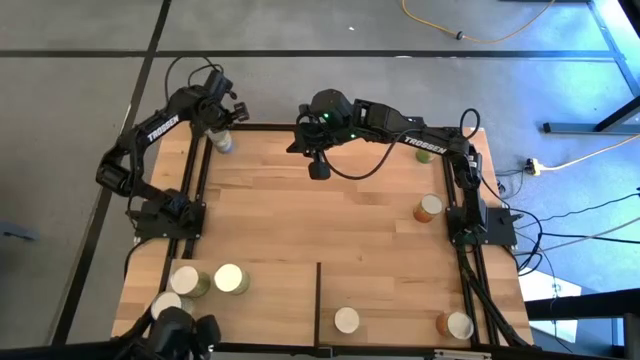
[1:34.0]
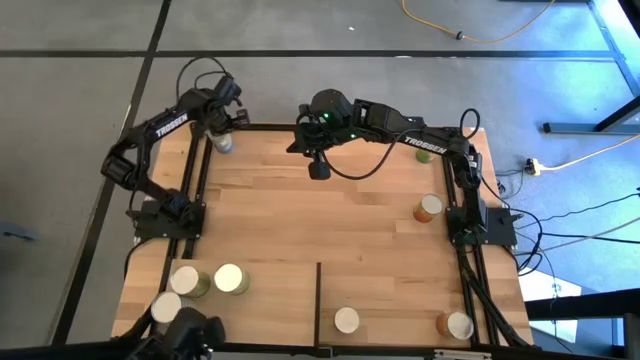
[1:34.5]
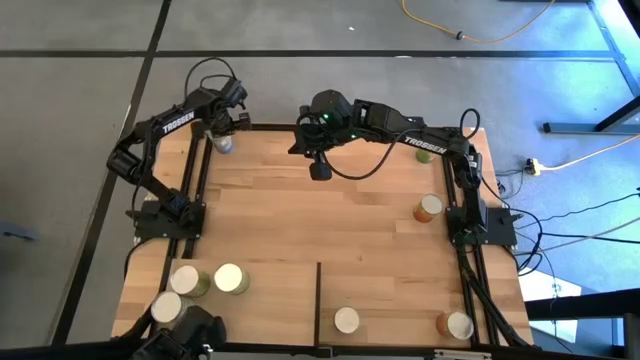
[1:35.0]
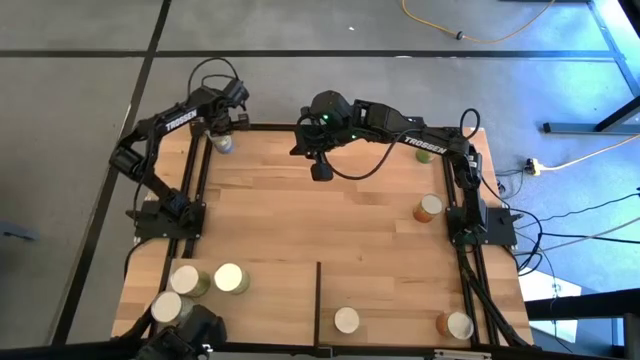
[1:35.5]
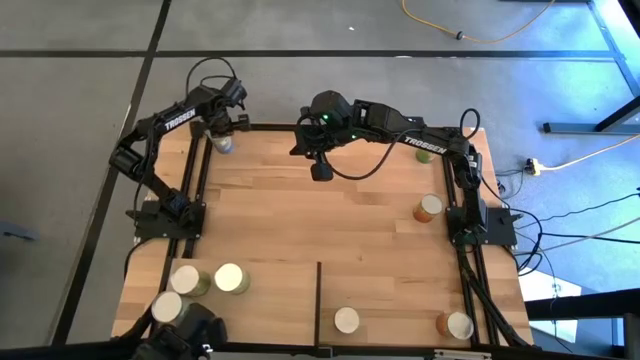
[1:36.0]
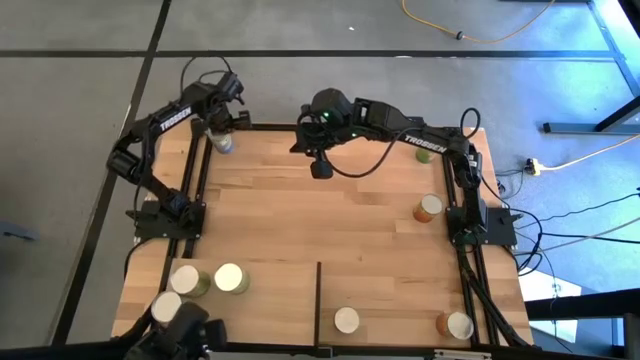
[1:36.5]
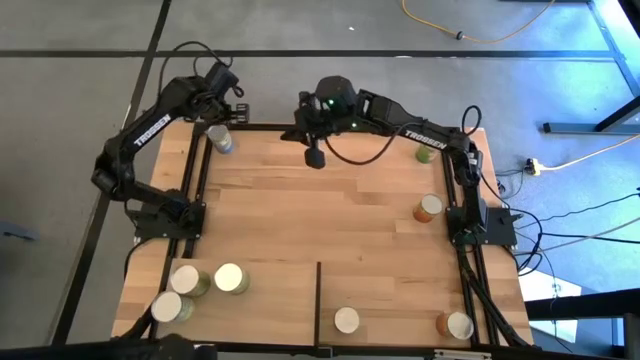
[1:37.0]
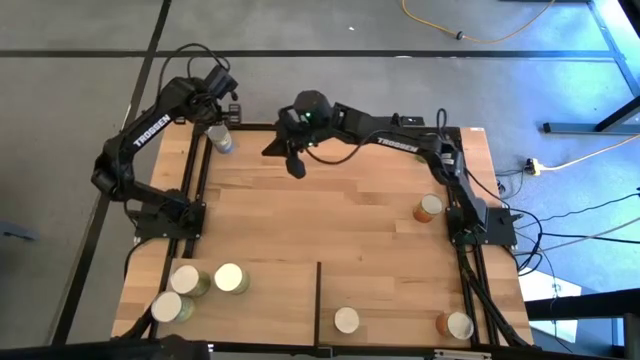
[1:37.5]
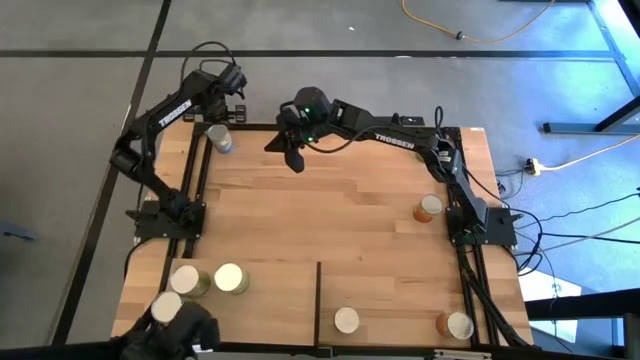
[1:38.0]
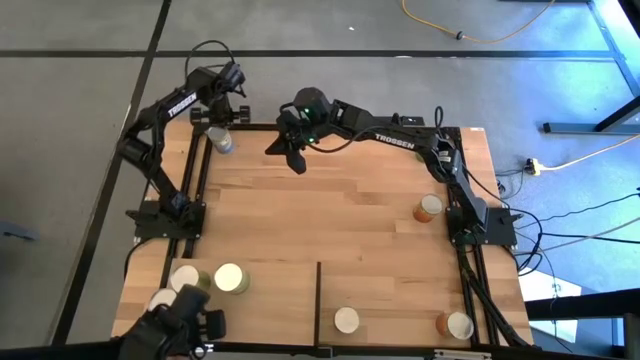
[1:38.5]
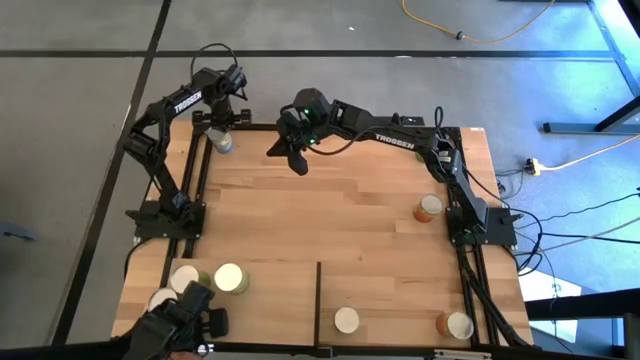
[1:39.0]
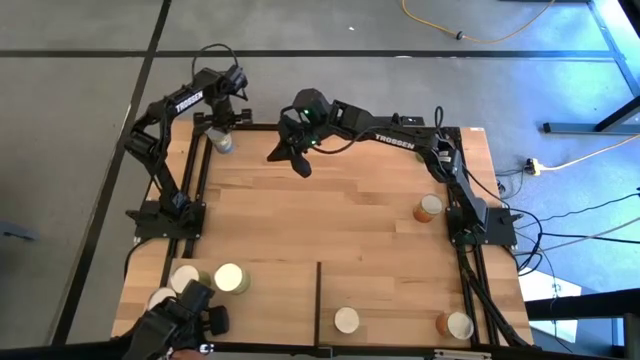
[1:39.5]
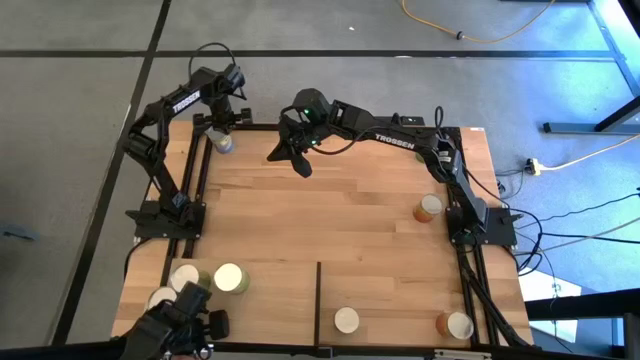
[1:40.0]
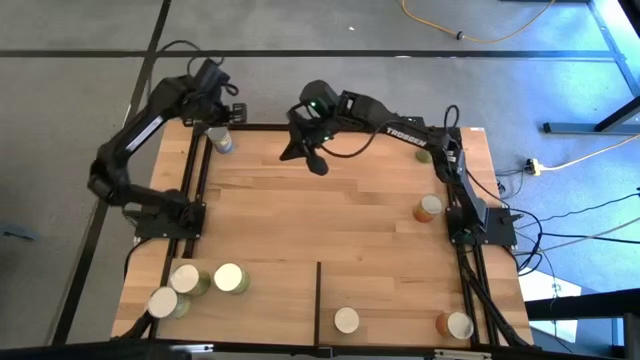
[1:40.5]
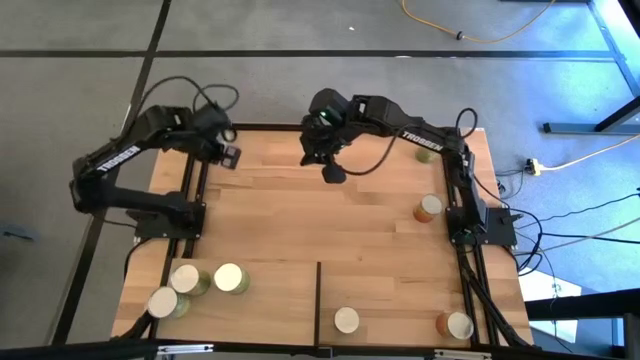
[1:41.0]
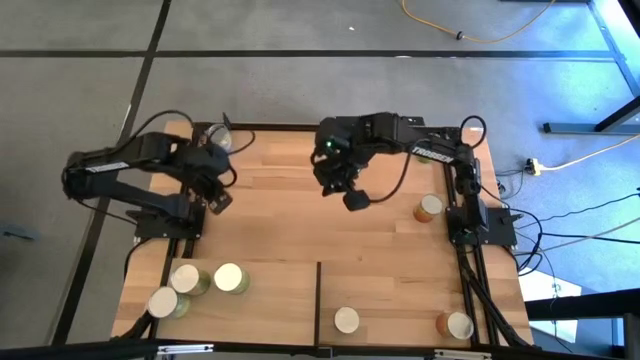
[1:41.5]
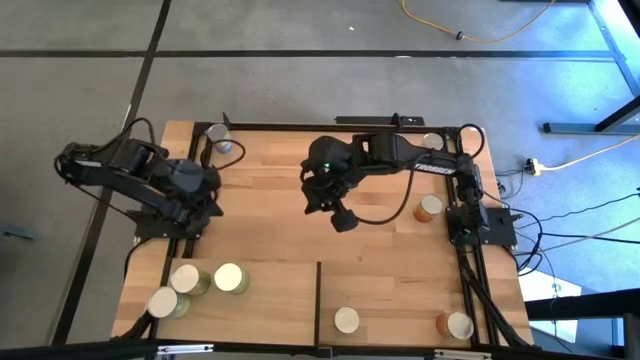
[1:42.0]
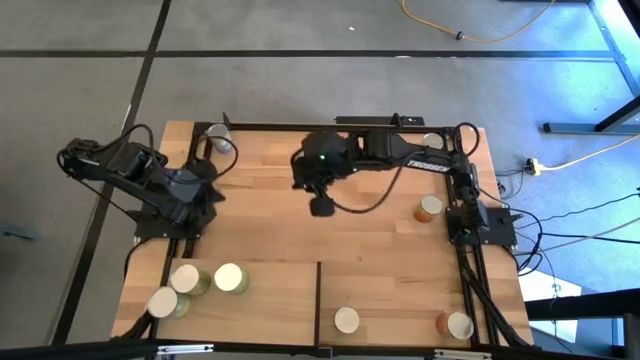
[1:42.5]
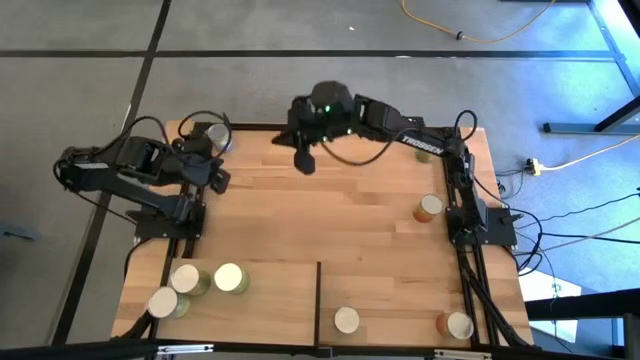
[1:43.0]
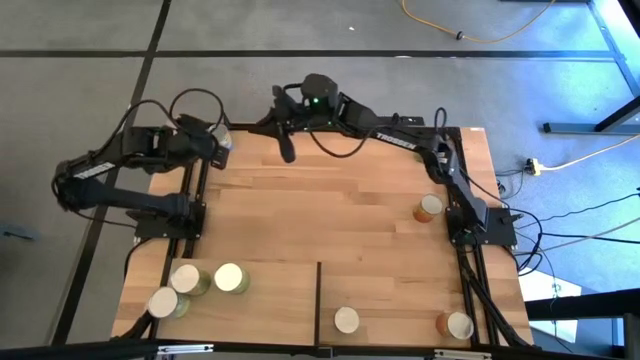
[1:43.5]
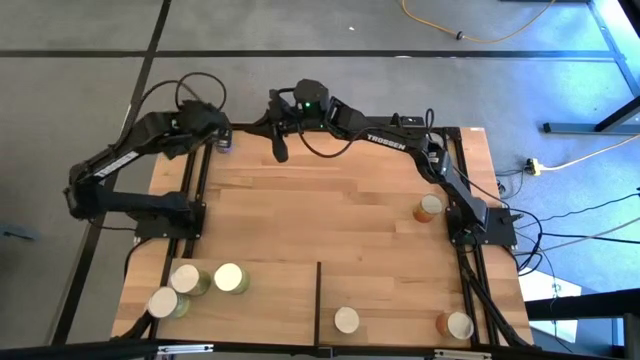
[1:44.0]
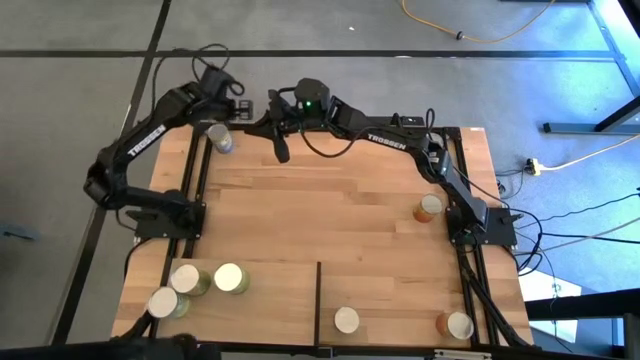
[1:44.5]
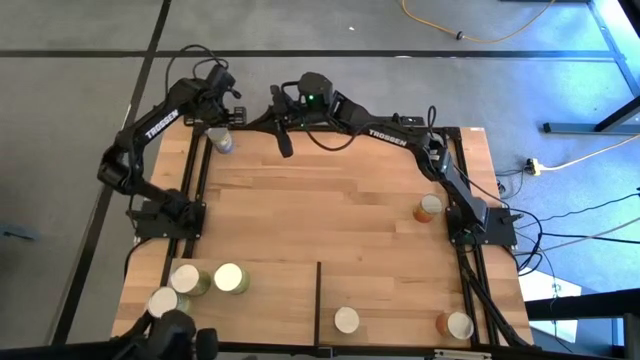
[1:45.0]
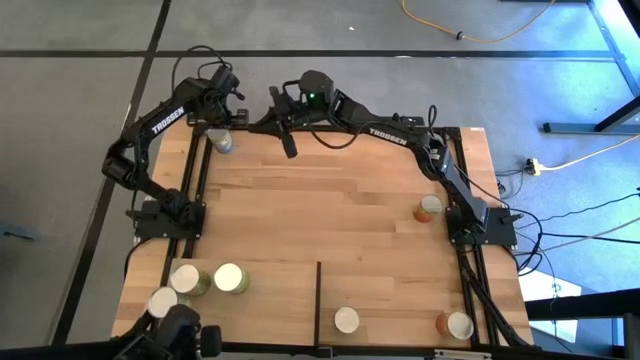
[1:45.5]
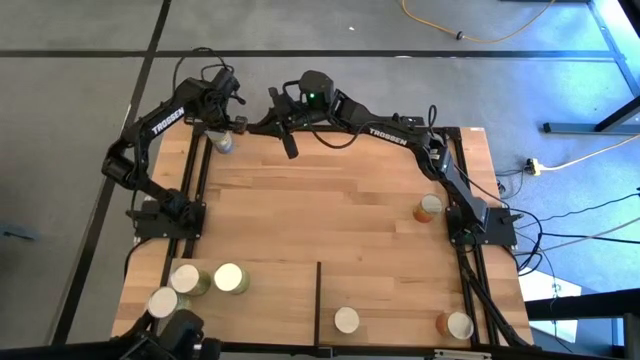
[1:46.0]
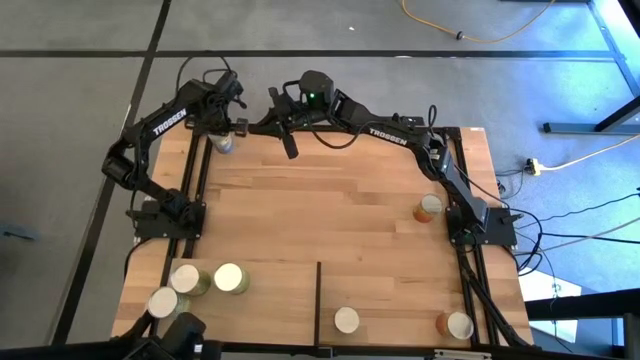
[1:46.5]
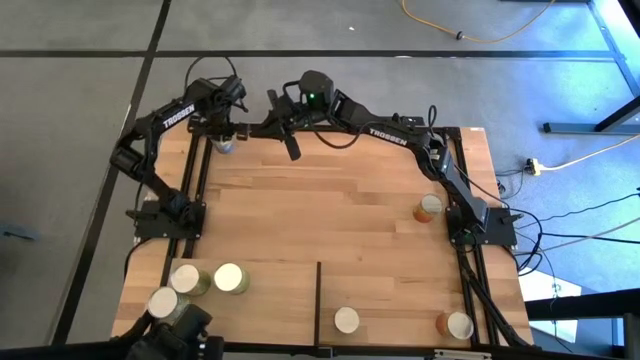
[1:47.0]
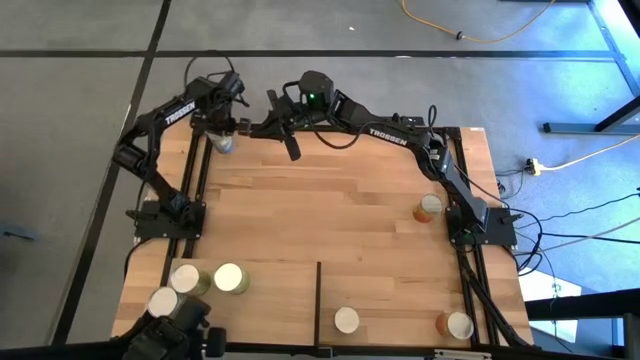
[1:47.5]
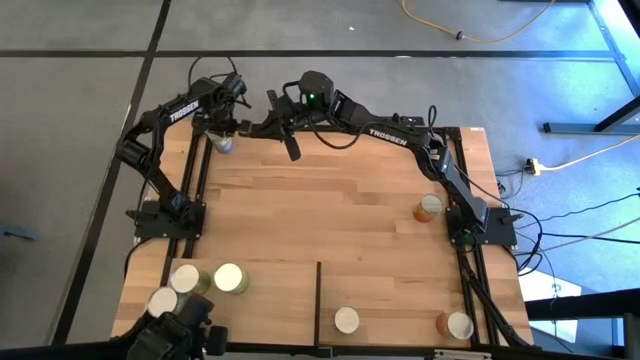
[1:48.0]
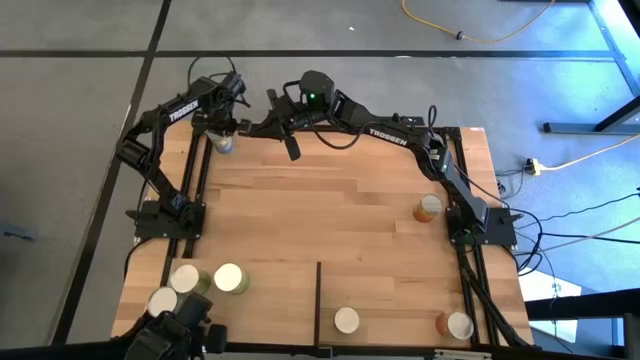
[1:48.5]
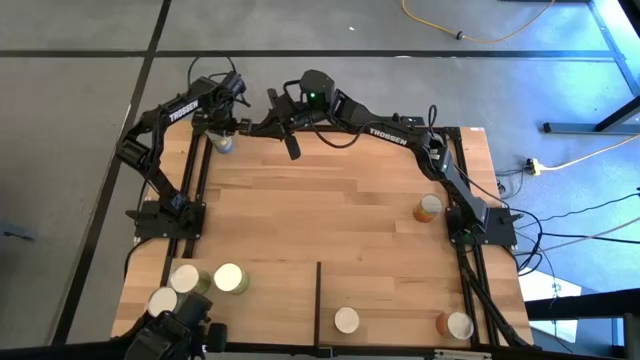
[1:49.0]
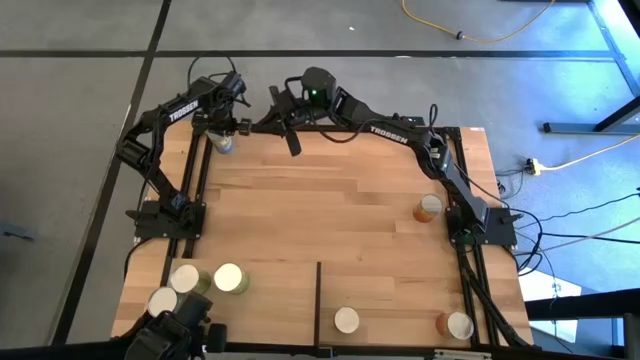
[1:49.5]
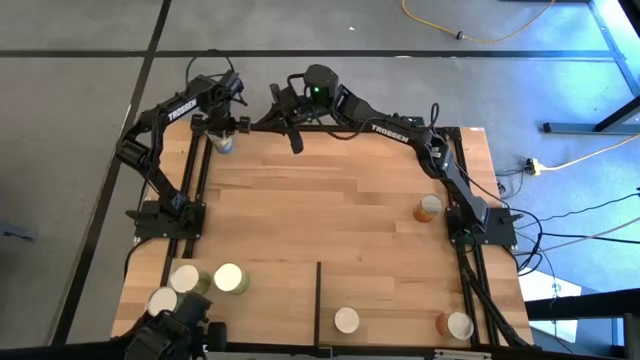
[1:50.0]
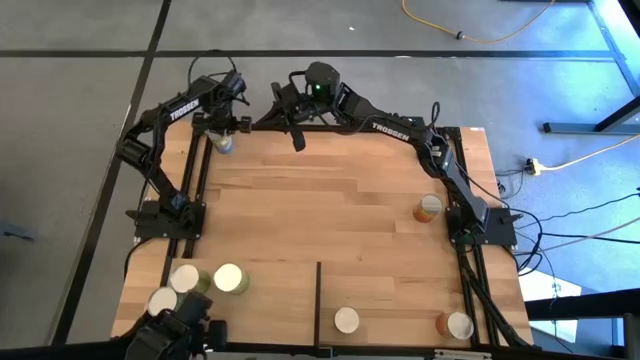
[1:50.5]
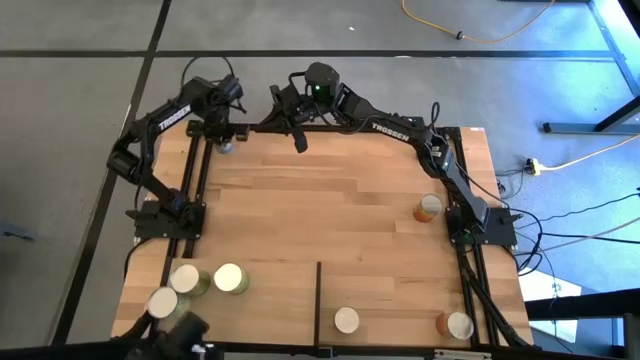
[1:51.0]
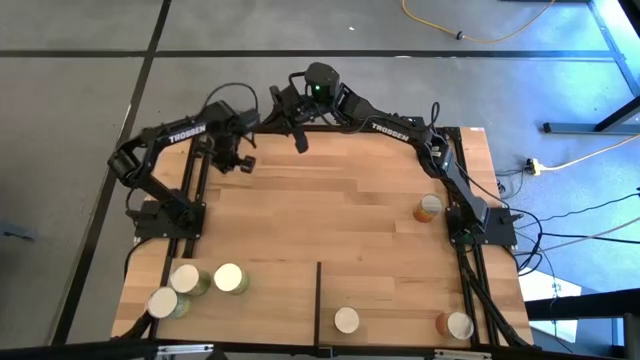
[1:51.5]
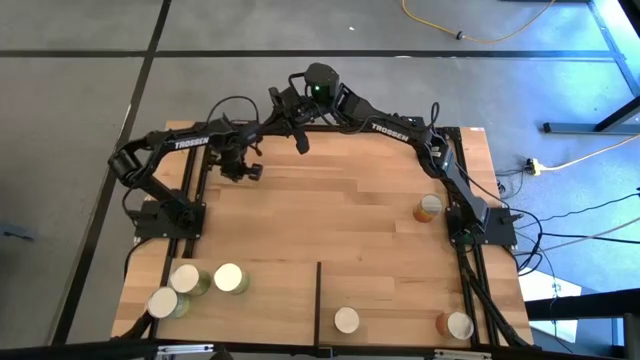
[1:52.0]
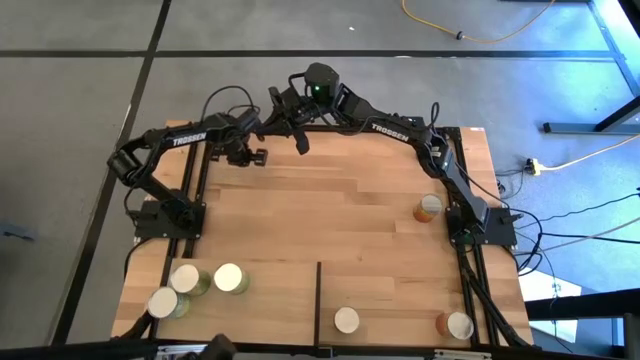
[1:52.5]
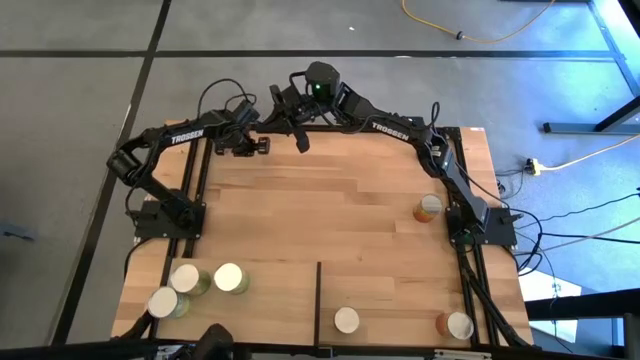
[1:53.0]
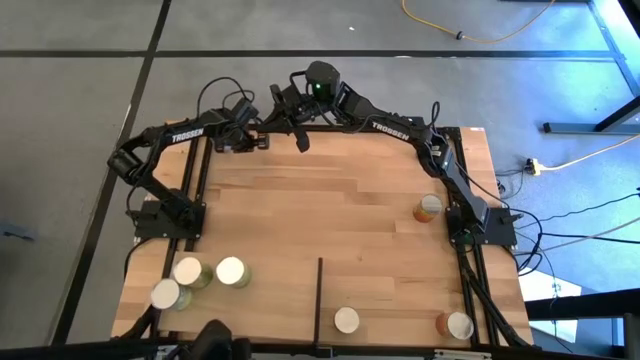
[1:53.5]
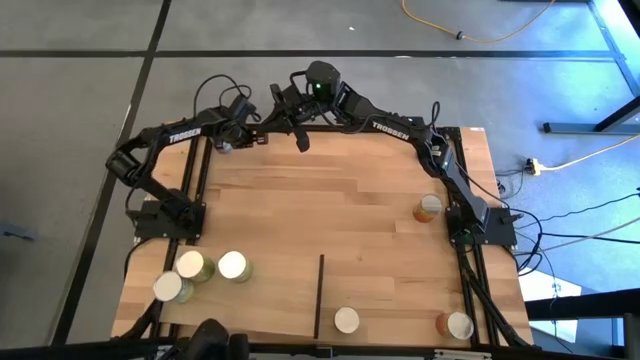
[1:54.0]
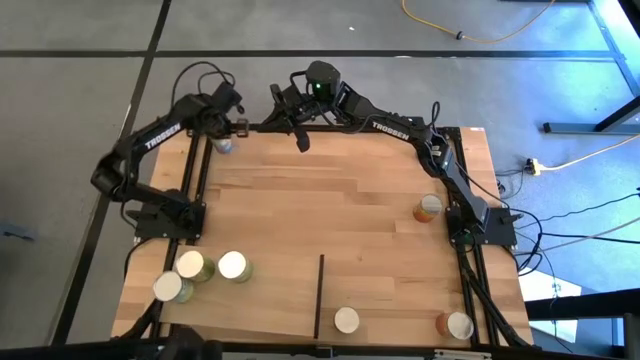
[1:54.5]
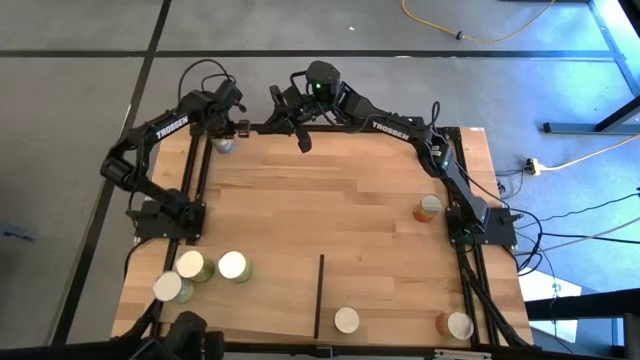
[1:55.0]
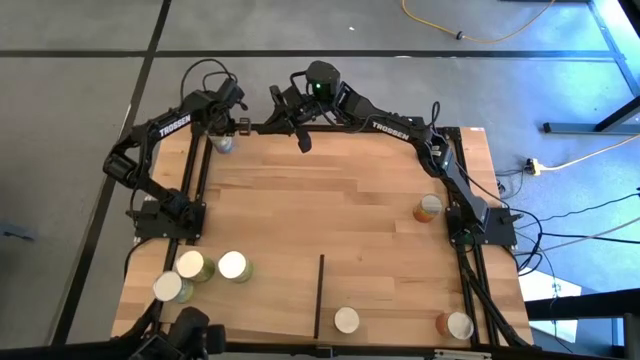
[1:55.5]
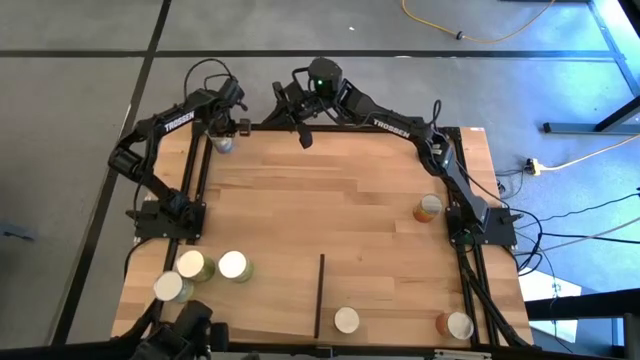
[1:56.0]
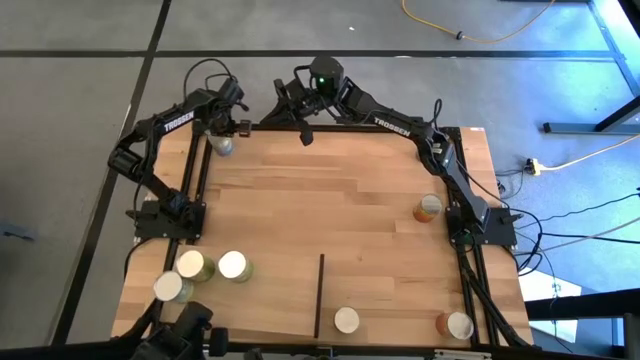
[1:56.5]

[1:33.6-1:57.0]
Task: Pick and place cans onto a shelf
Put the canned peas on the shelf
